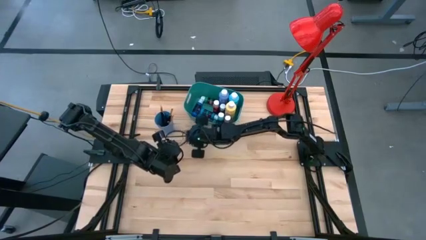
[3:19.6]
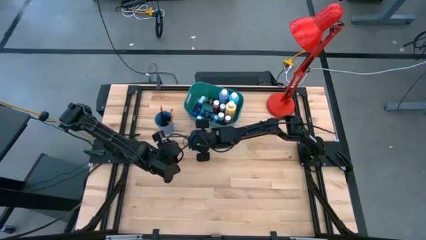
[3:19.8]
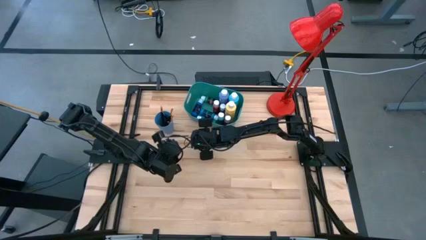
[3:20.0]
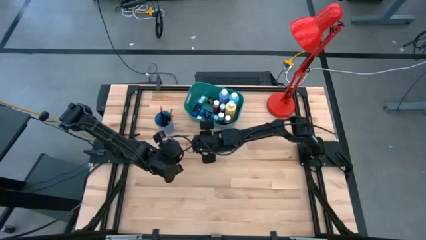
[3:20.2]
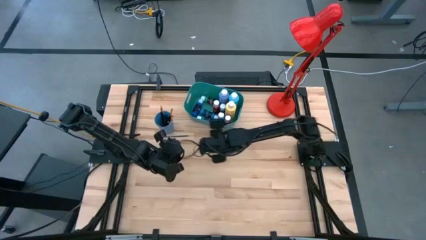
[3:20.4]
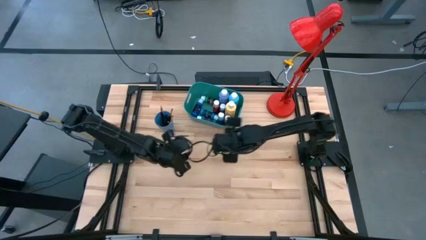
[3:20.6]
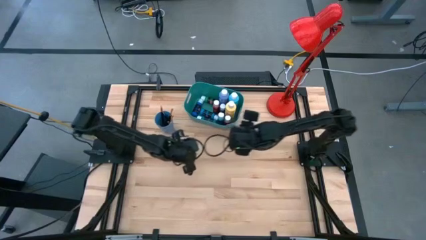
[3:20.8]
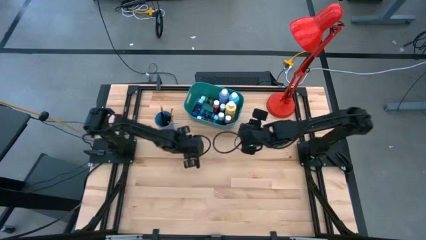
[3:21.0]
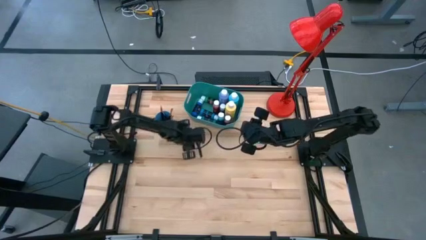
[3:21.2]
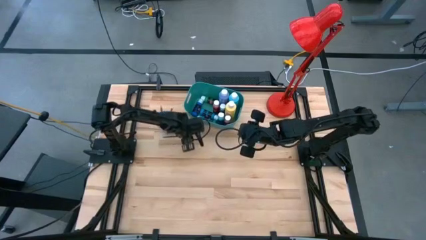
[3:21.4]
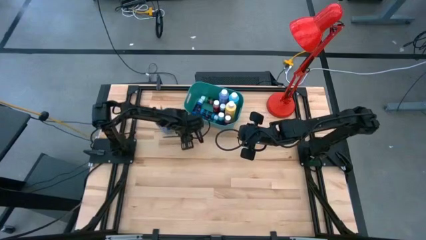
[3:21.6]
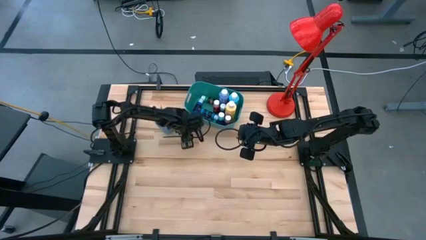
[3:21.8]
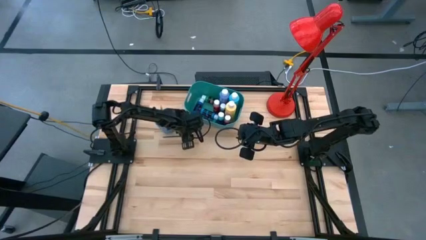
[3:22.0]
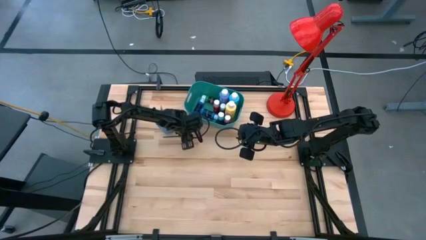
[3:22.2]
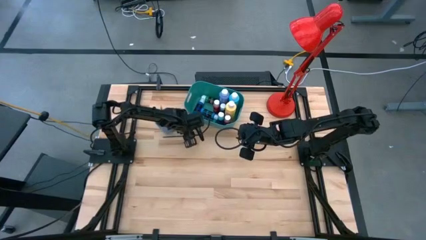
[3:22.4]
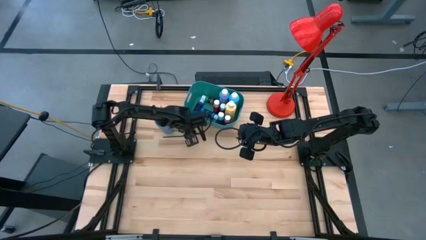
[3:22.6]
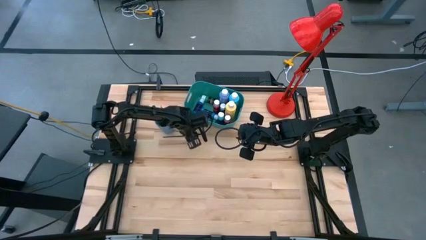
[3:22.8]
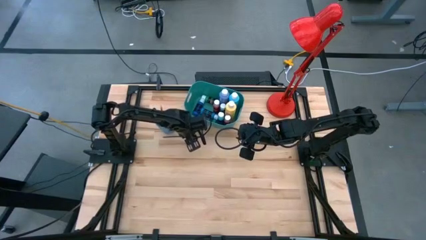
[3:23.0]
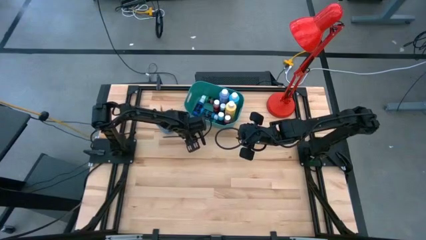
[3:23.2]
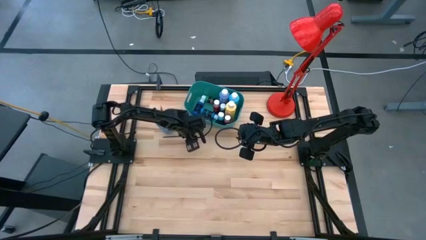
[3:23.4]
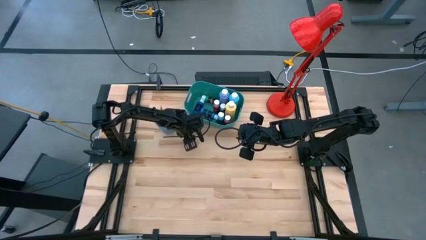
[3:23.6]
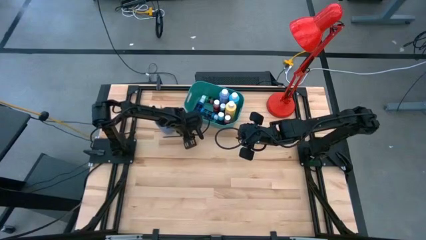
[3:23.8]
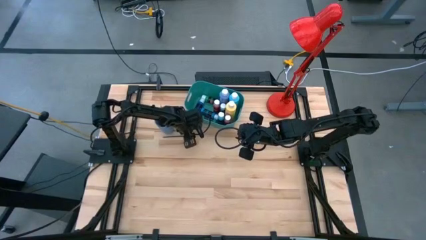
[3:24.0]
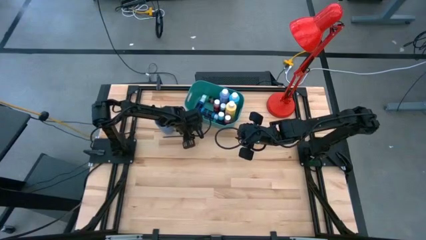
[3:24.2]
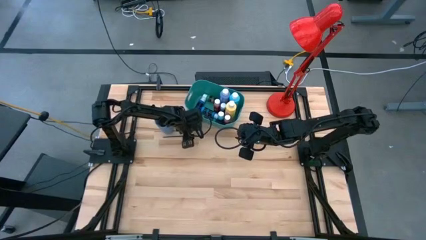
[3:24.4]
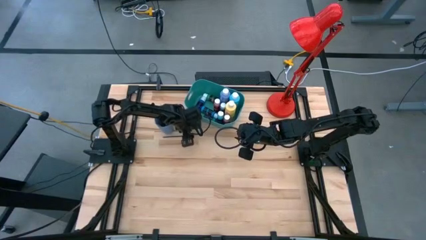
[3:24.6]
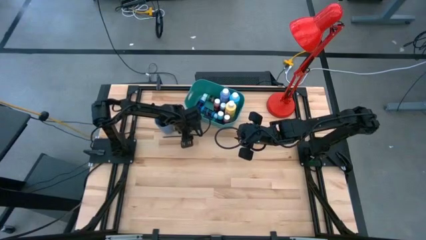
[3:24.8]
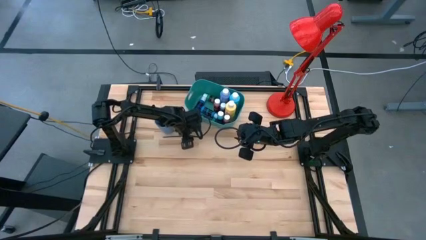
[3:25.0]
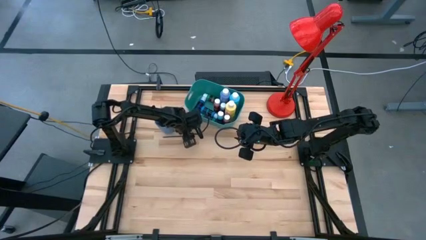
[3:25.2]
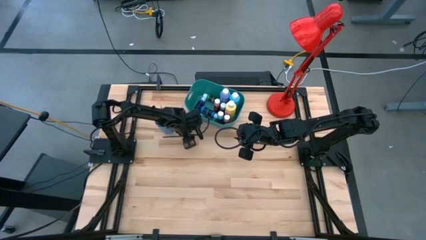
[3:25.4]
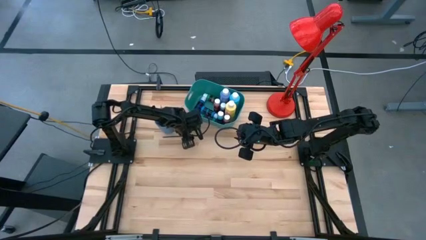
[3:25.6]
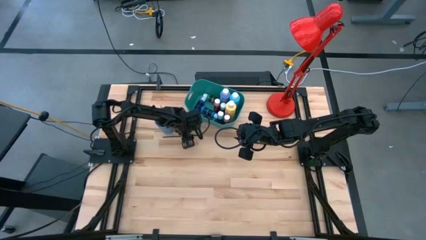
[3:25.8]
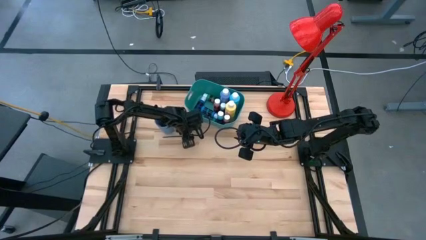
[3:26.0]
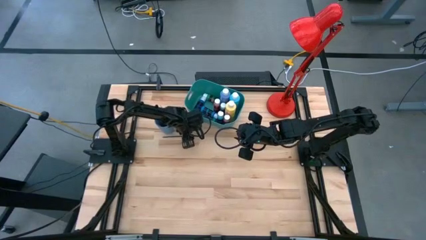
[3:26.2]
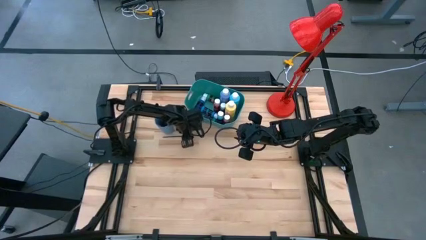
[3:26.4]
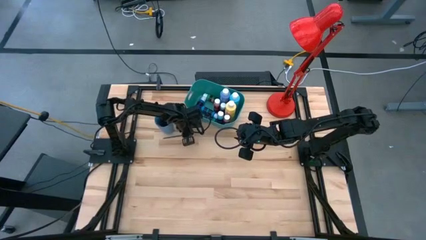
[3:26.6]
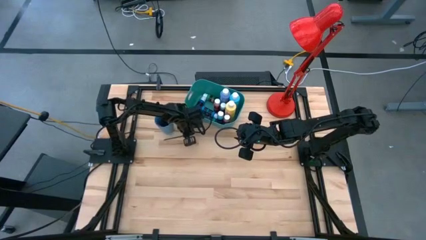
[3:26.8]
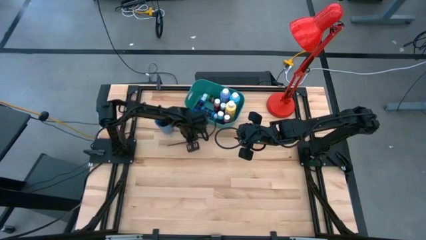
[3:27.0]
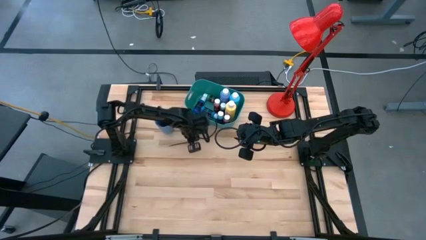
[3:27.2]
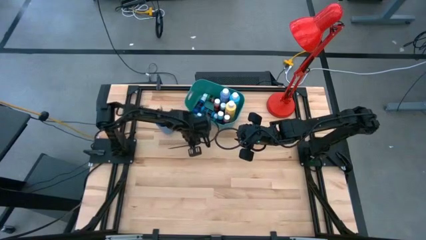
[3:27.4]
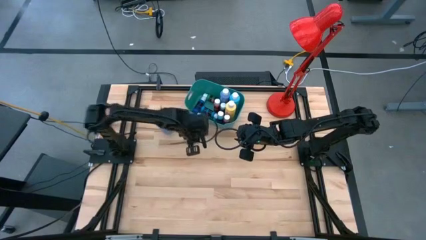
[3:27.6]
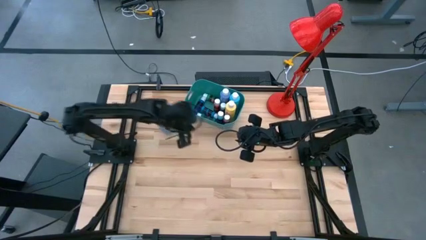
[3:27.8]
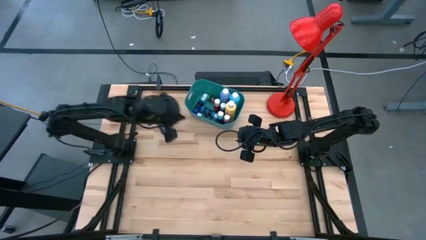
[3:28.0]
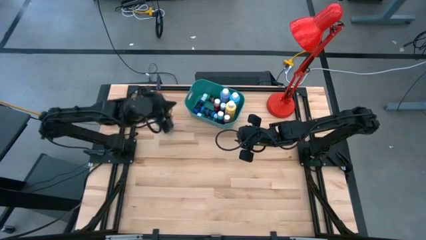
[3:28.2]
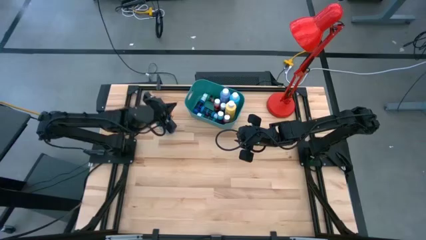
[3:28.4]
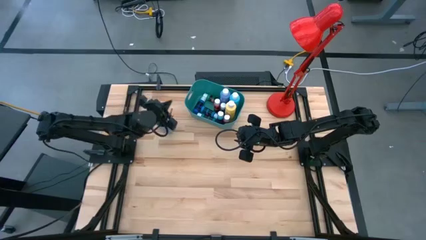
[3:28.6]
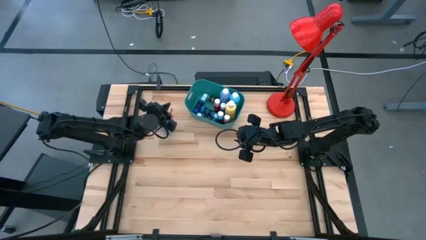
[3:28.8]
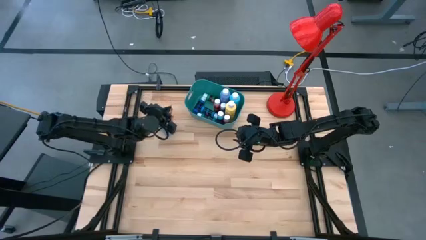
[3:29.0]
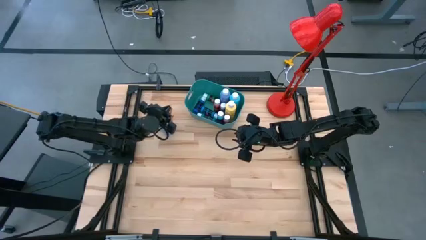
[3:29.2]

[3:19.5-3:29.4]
Task: Pick & Place Paint Supplies
Put the gold paint brush into the blue cup

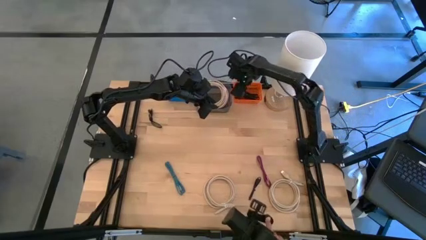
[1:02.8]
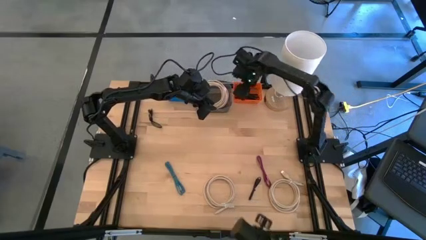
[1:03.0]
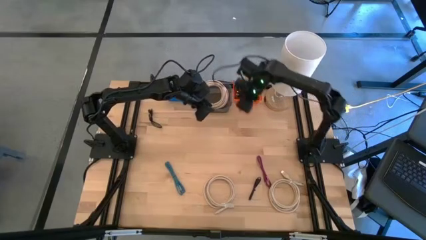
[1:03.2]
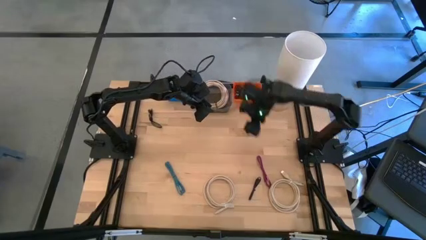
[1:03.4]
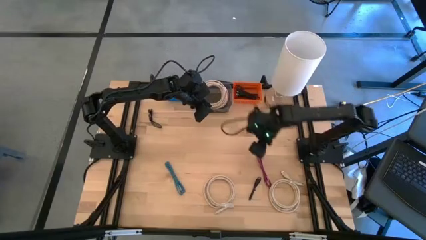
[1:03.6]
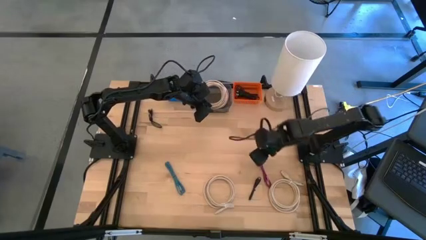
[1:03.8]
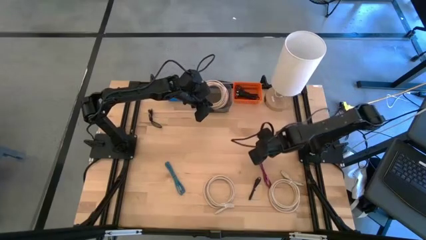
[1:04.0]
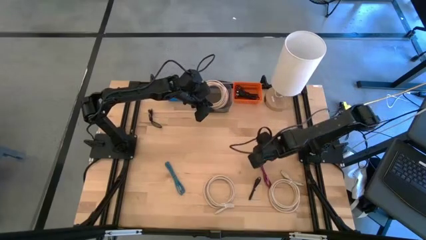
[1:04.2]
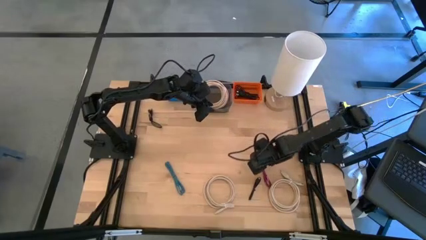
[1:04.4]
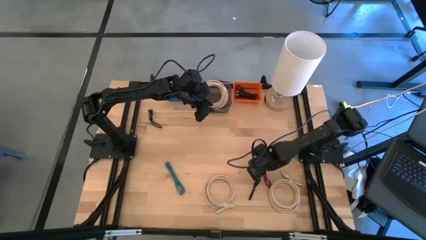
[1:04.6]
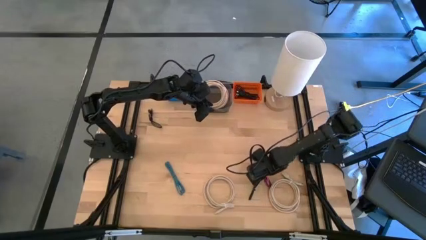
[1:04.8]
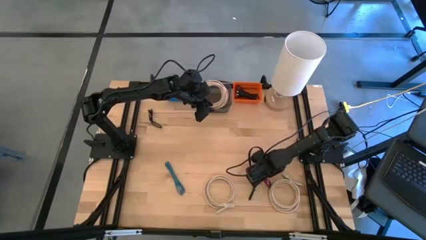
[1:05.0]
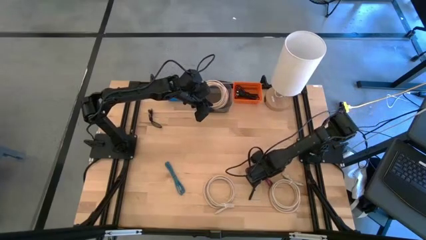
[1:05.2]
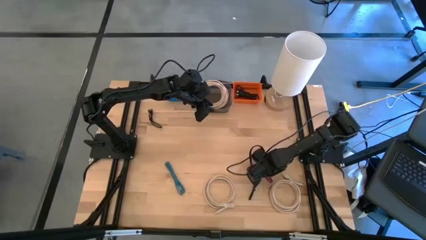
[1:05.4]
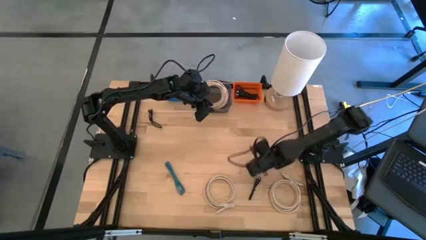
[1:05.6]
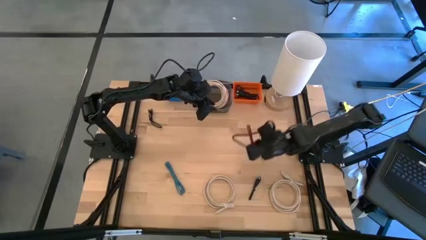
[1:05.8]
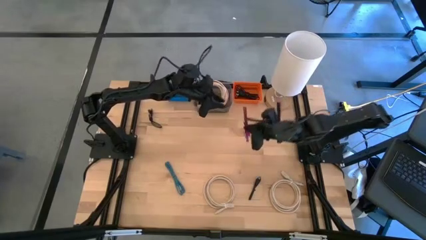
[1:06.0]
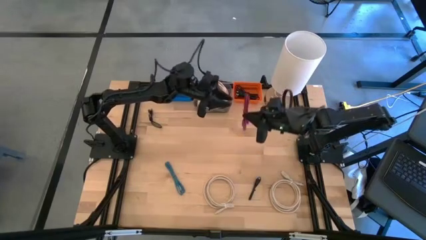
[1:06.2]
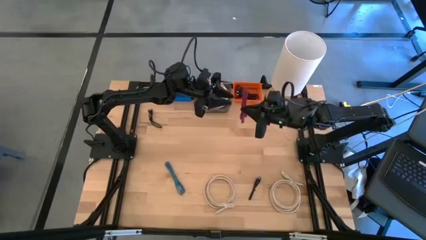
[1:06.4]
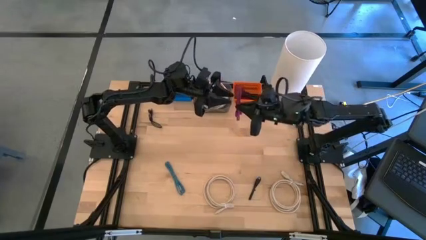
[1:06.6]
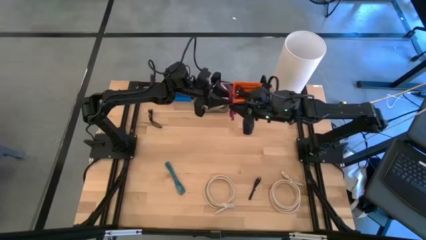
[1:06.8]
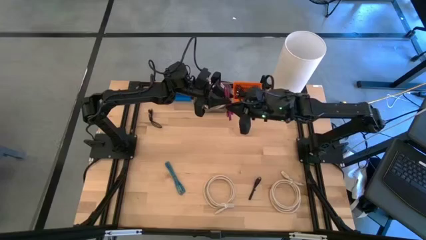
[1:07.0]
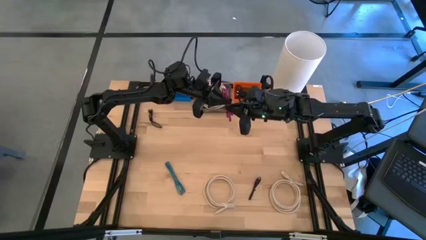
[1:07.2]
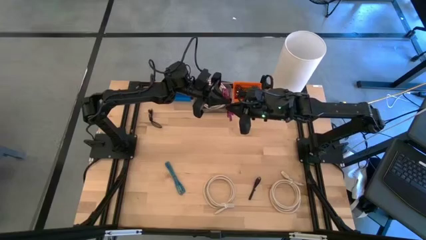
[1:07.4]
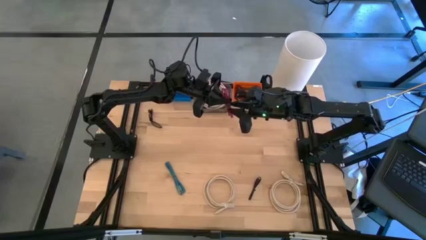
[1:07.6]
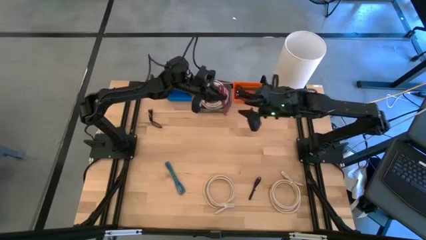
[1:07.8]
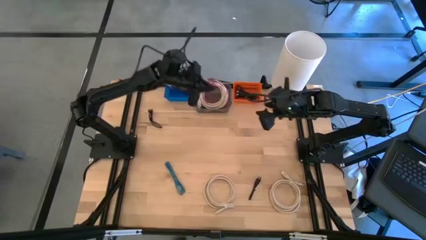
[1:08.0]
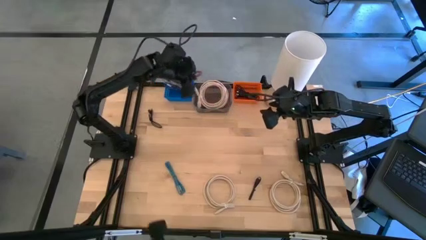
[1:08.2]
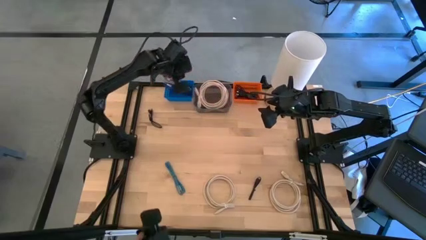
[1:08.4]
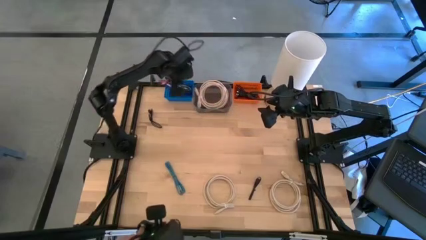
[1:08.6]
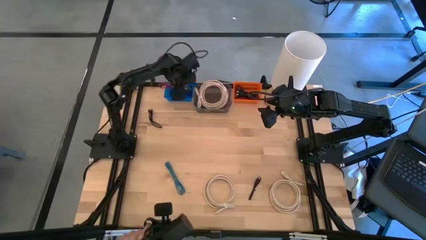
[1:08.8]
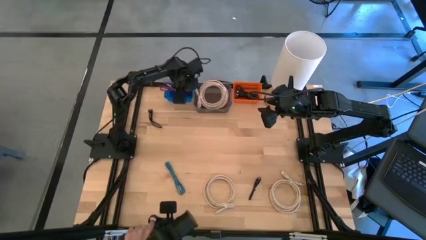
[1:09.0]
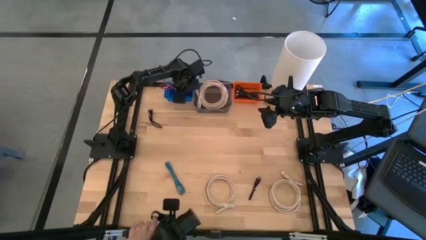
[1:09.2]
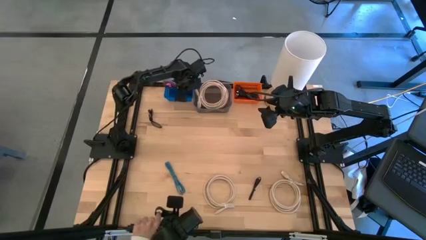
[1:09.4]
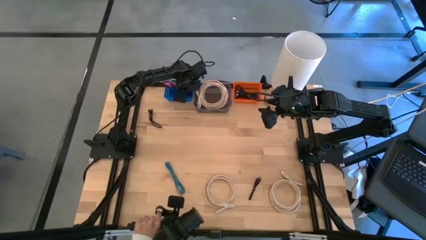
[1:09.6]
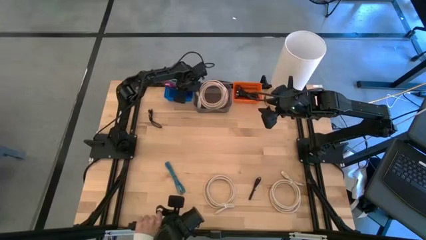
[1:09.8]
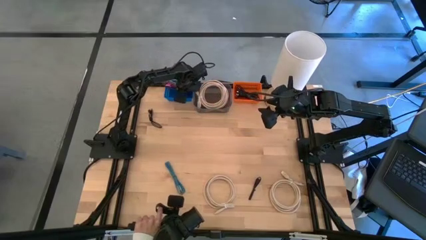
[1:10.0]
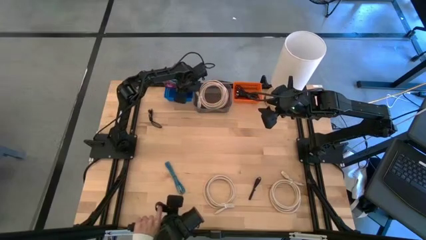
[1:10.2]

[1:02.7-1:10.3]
Task: Pick & Place USB Port
Put the pink black charger cable into the blue bin
